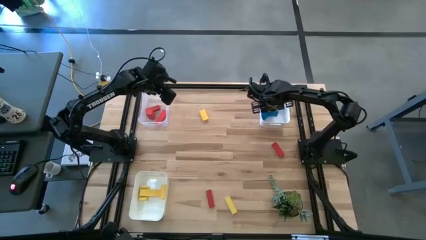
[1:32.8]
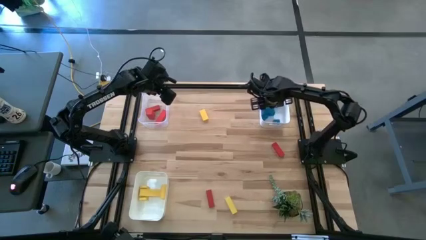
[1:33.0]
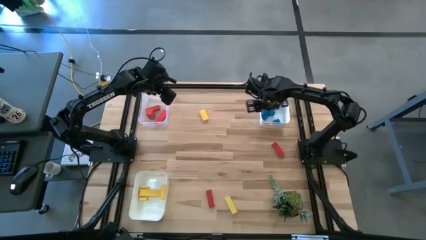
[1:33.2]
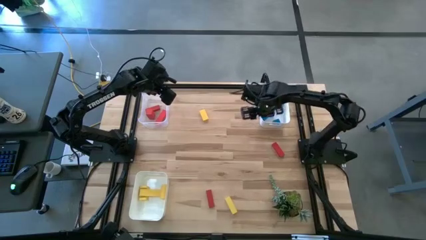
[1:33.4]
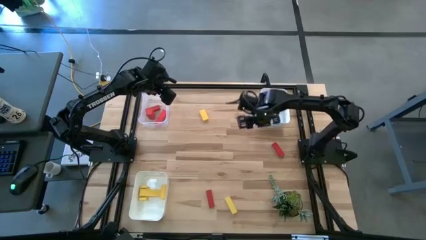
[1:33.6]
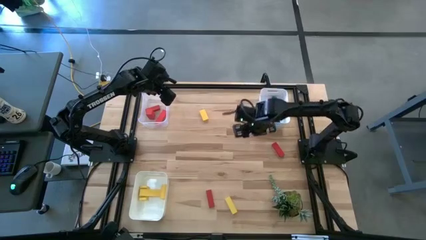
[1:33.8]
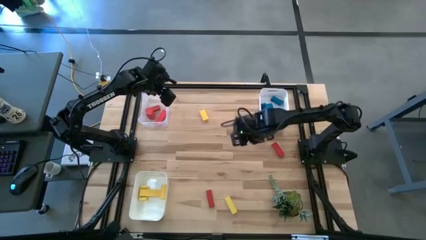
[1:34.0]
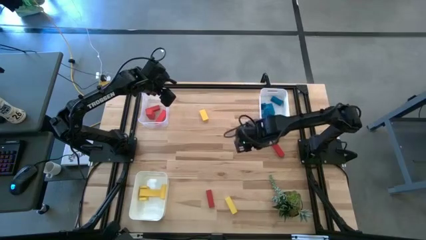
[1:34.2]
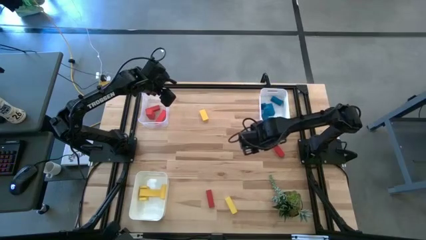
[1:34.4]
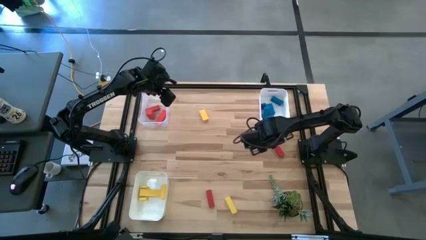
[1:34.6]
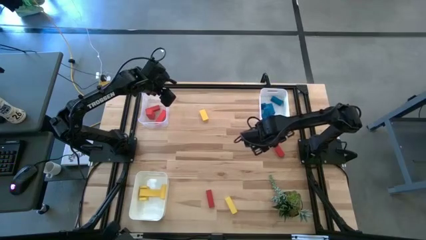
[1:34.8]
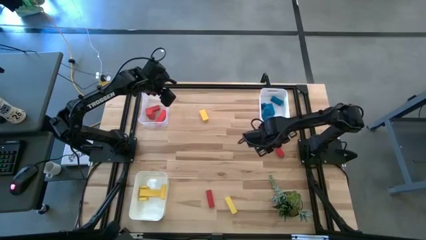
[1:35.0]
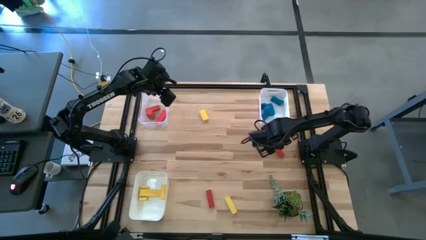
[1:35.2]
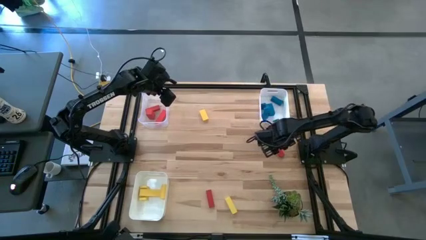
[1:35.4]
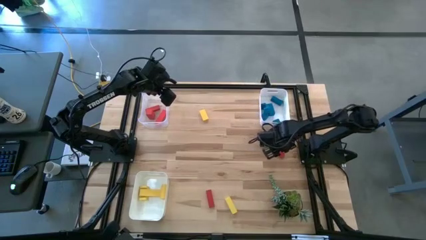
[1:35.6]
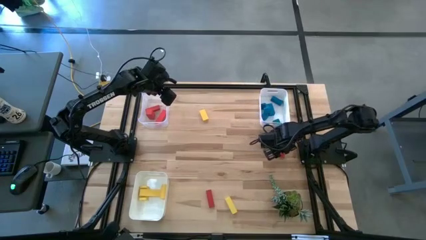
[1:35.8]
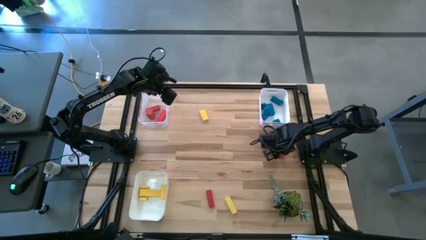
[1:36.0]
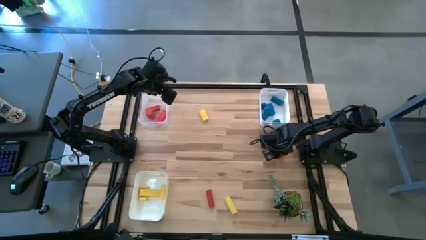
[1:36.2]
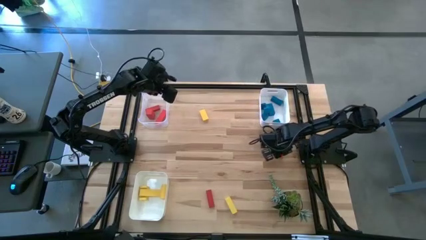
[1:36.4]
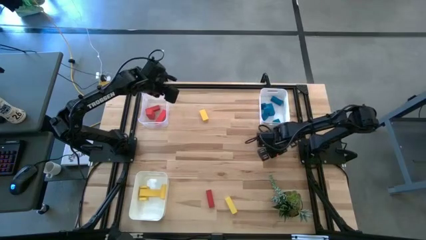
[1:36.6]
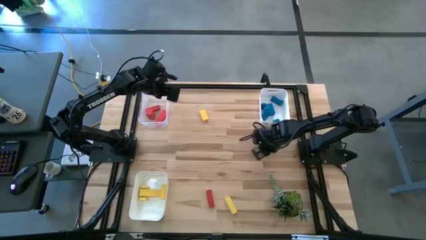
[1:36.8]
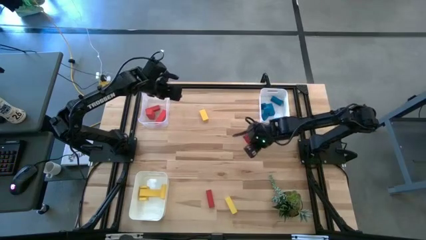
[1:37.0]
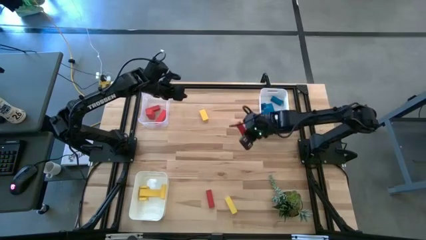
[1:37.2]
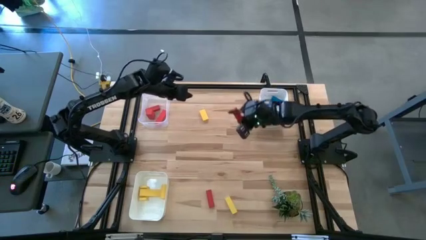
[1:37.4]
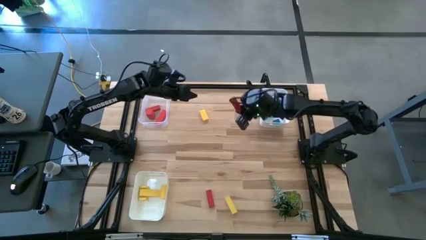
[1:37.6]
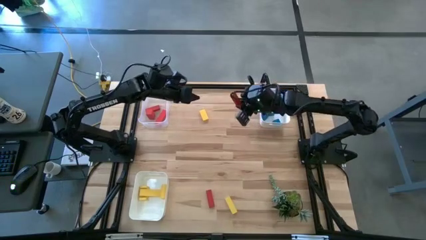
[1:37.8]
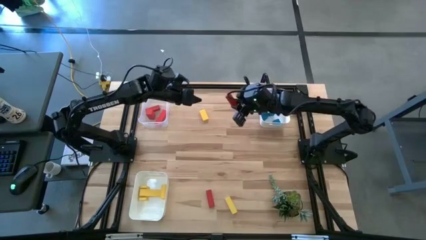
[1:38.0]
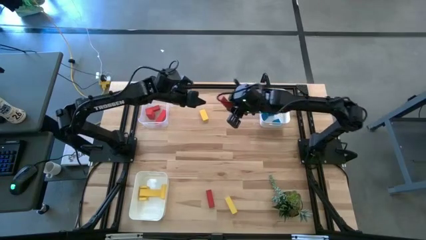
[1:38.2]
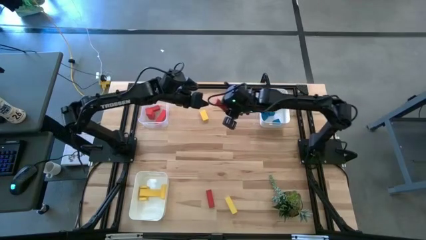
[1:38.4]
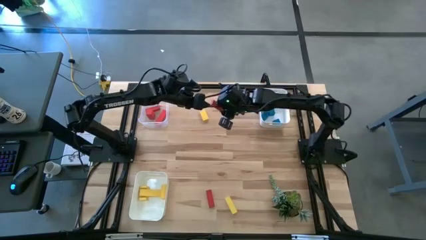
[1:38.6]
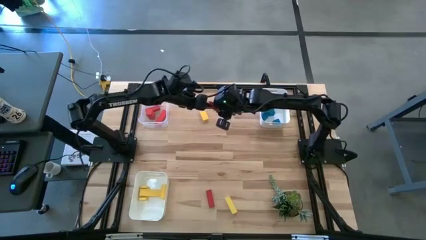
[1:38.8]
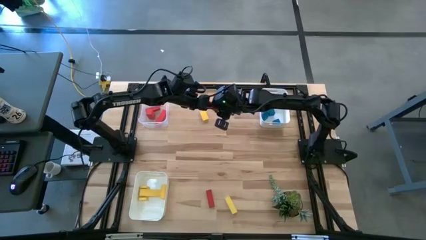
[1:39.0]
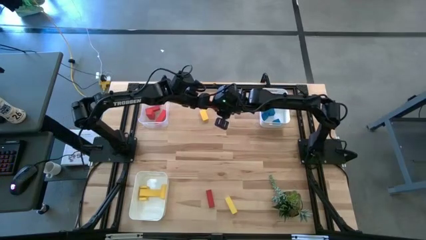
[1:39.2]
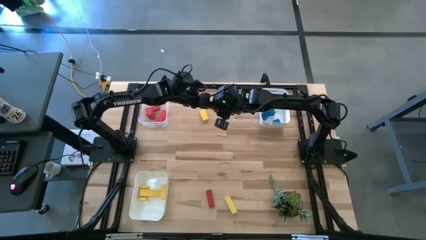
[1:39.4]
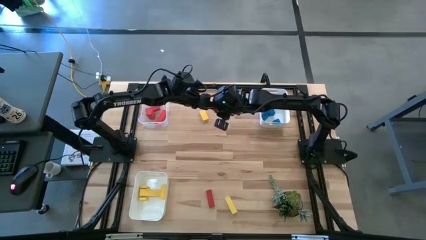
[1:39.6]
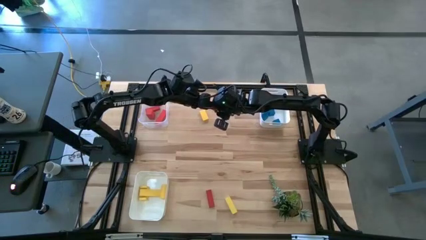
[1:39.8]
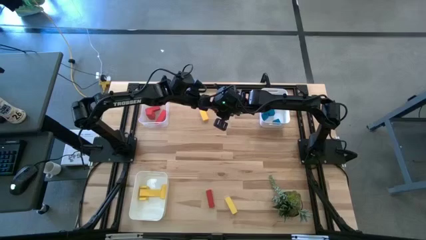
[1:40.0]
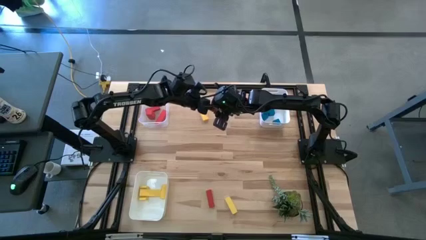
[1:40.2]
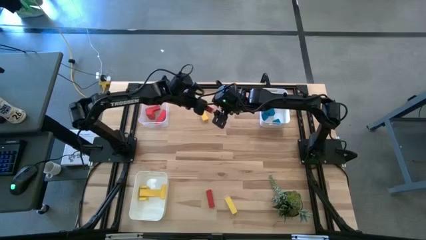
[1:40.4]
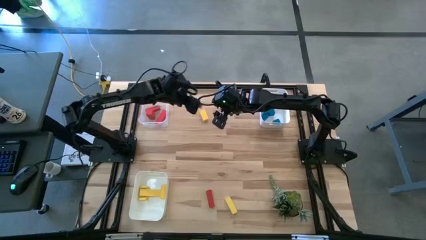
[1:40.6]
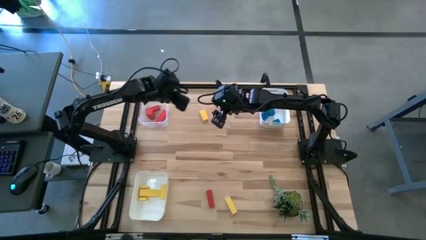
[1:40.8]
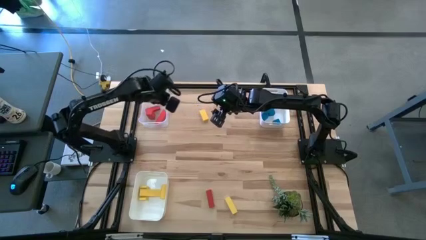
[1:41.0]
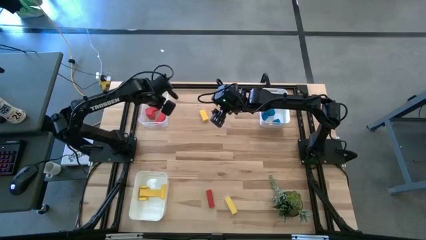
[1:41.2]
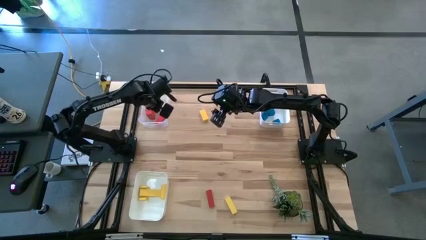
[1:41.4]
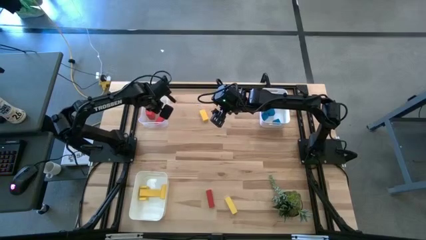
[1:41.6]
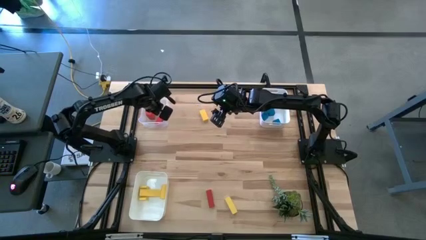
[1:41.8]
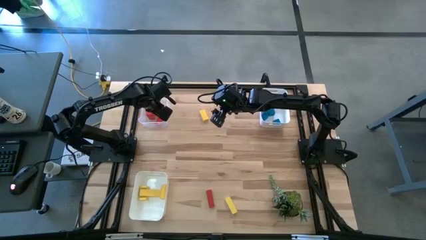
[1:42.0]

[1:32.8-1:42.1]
Task: Sort & place blocks by color
Put the red block into the transparent bin

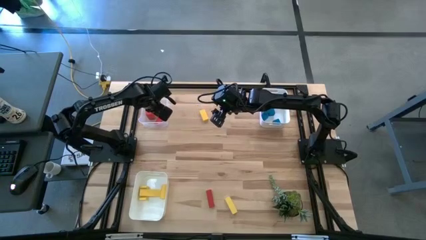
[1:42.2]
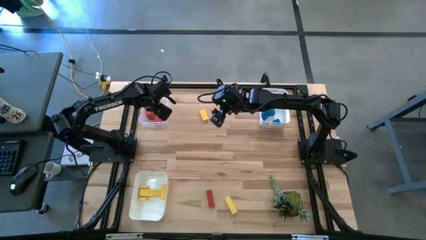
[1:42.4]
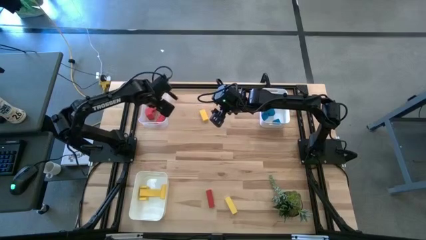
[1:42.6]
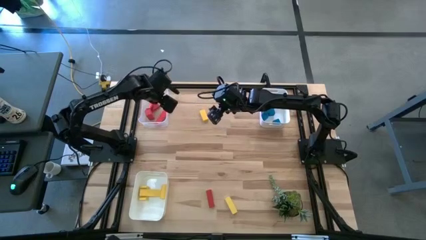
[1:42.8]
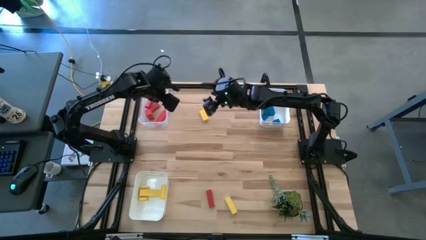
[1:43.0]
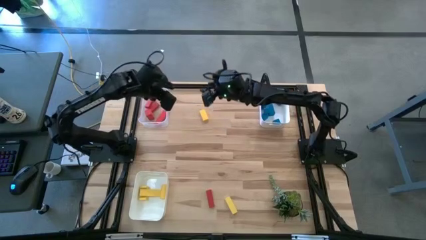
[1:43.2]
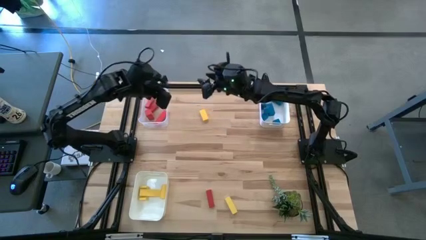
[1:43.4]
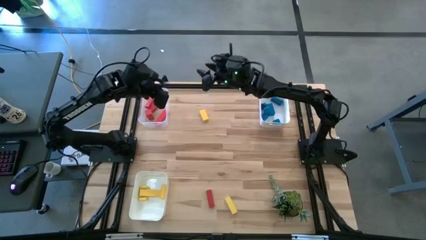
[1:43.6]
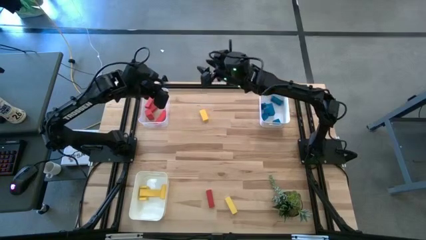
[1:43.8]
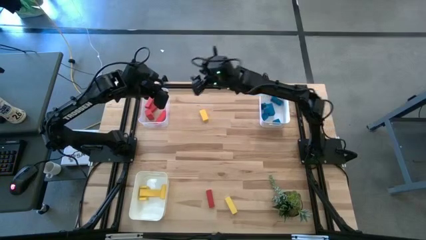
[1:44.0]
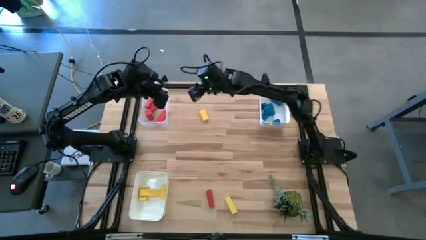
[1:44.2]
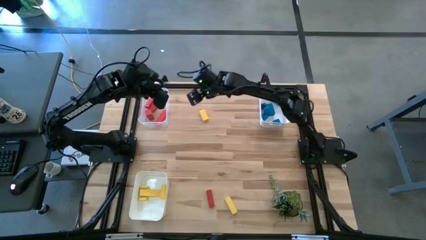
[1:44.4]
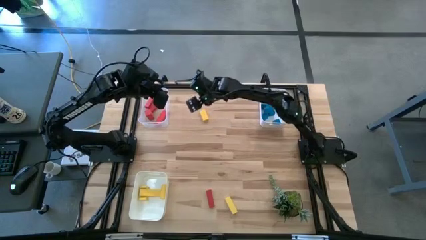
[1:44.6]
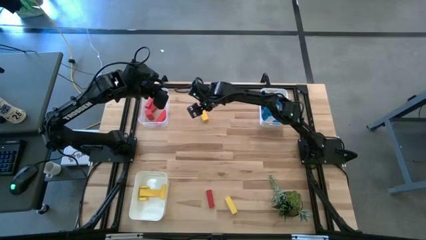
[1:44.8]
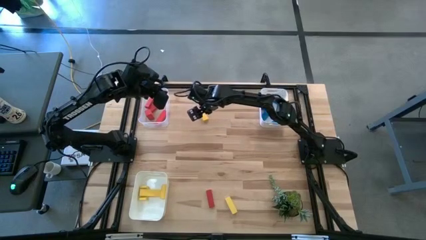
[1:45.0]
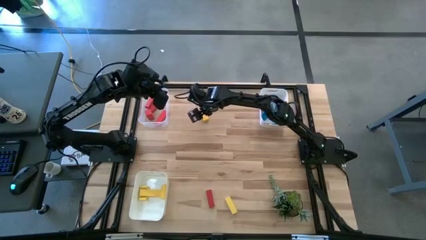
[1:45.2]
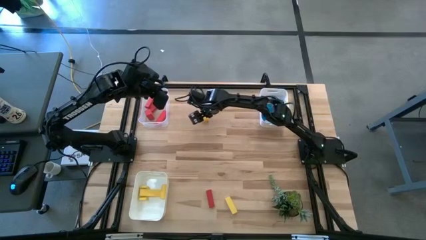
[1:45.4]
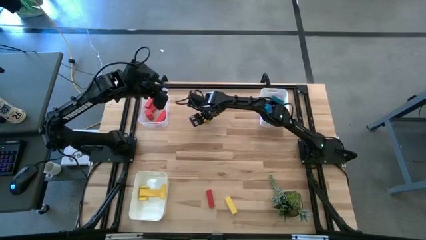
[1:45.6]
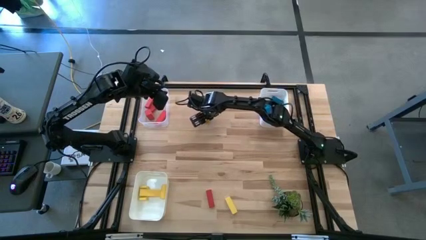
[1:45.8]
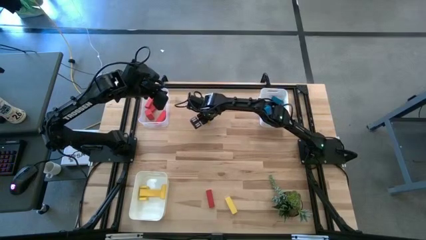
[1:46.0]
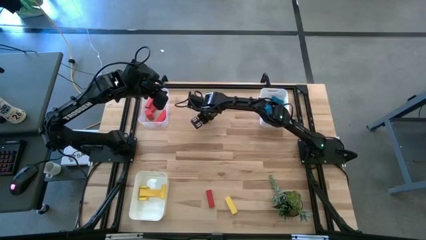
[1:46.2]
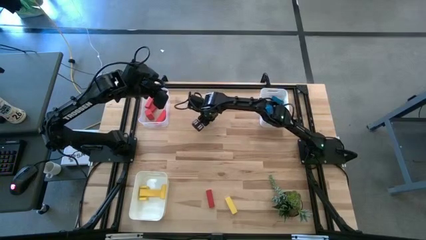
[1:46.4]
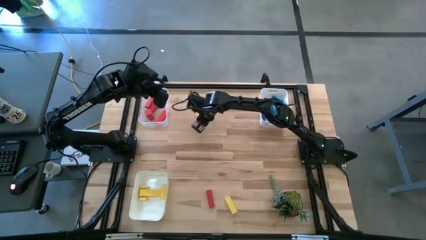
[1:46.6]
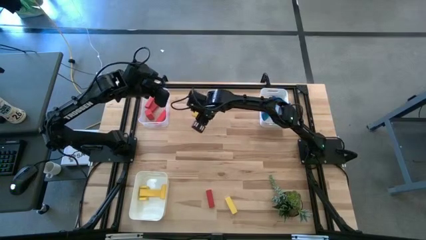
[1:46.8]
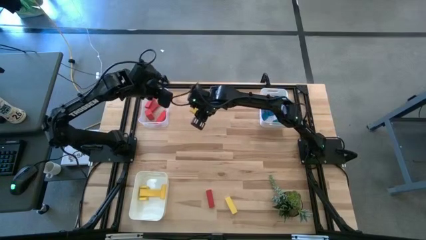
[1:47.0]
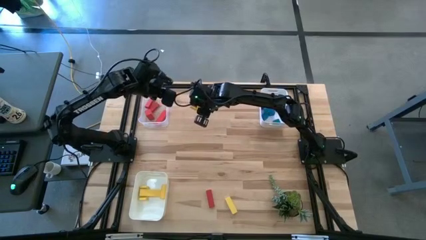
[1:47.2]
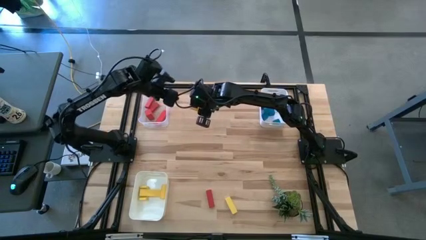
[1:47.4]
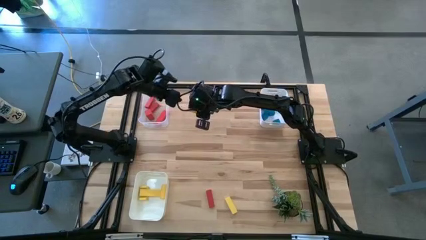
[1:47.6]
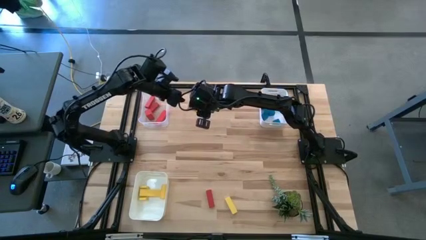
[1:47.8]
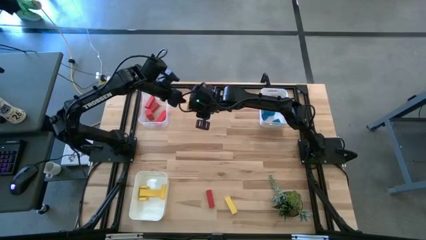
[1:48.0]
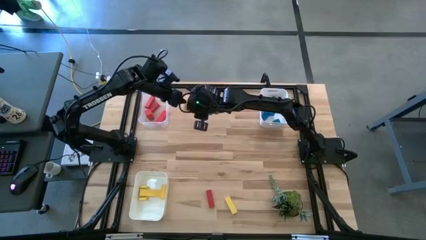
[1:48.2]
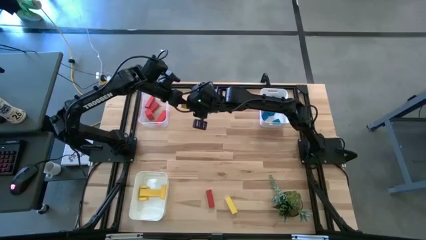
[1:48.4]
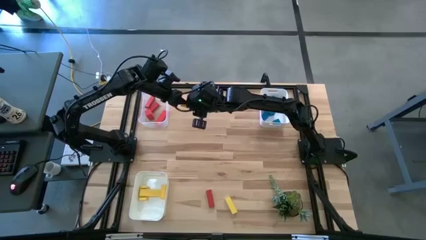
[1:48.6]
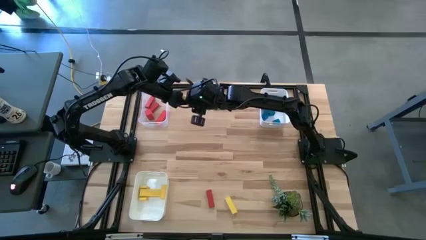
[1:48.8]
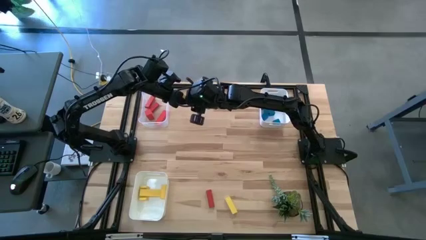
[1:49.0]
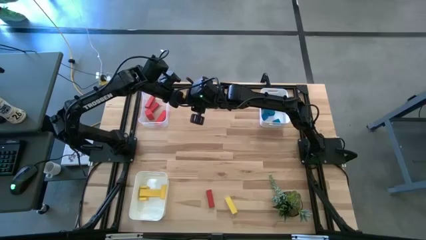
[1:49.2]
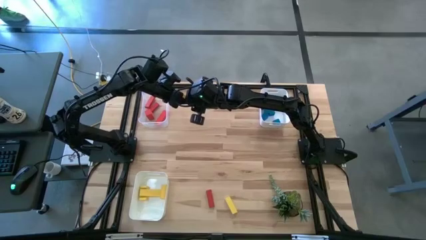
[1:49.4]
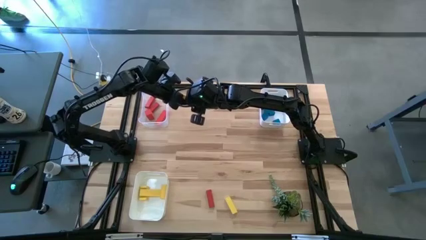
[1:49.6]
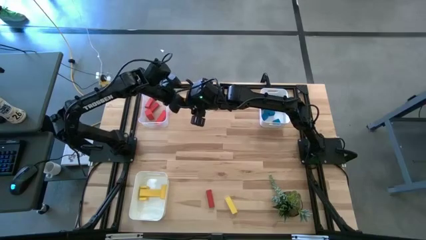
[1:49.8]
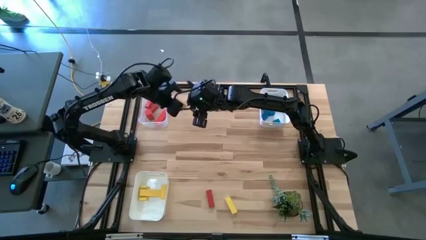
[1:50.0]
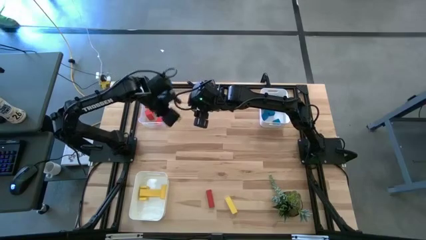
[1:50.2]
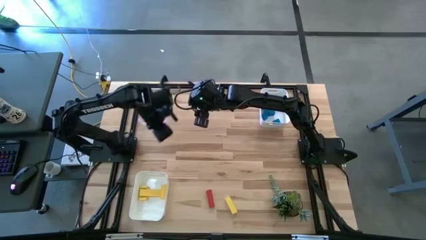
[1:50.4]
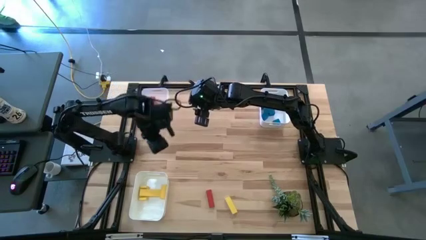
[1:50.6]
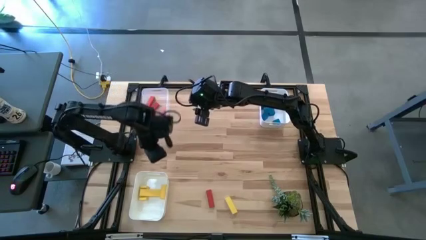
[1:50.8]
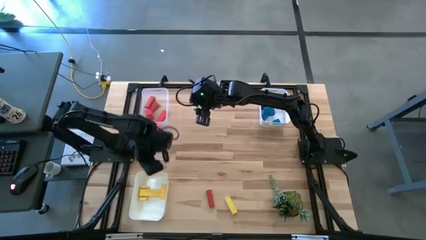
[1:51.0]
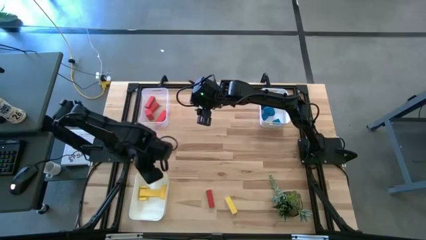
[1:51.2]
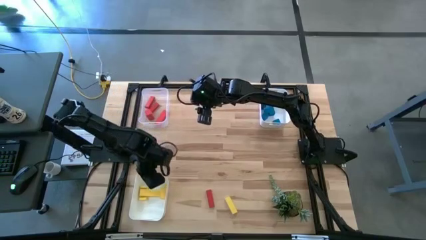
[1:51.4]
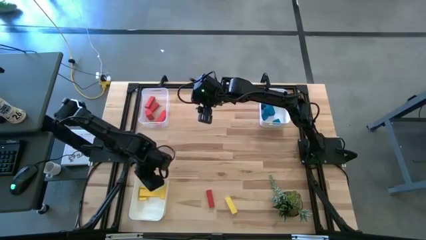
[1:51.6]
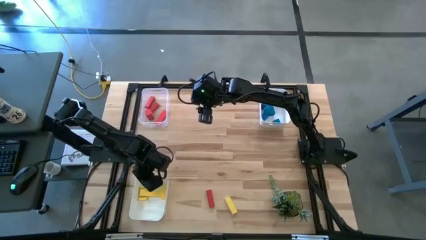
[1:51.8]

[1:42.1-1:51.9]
Put the yellow block into the bottom white bin
